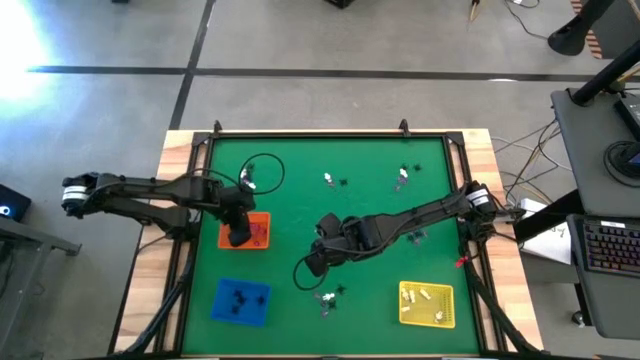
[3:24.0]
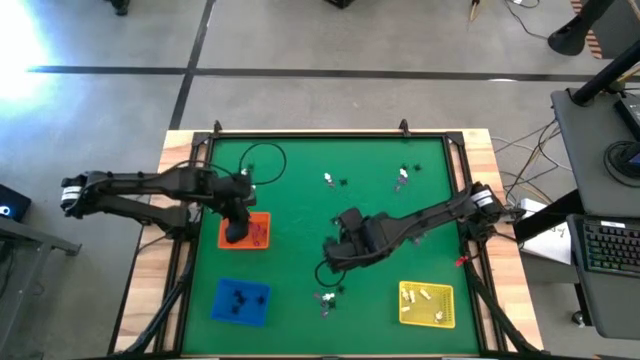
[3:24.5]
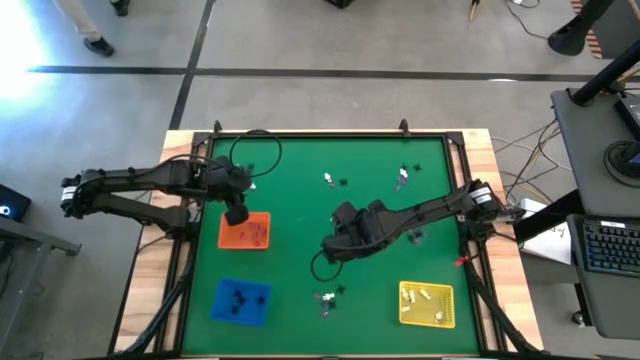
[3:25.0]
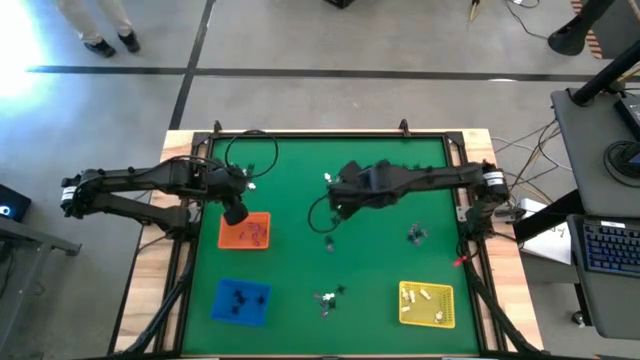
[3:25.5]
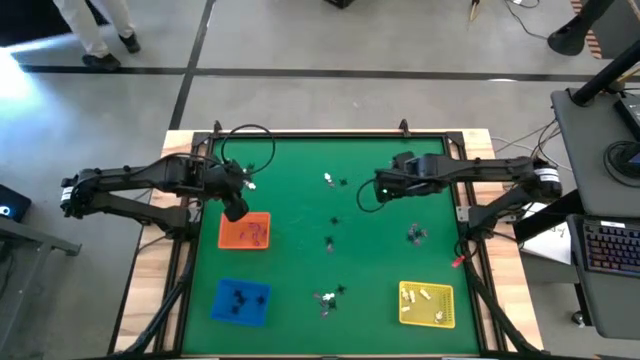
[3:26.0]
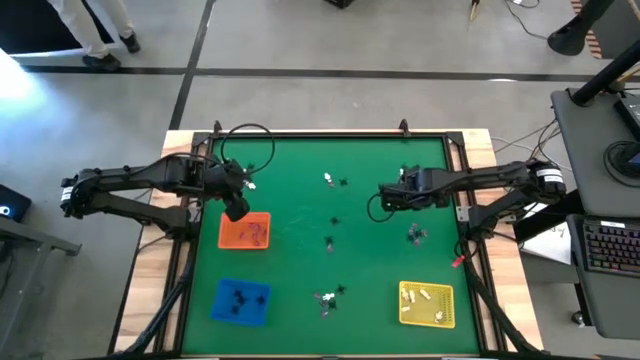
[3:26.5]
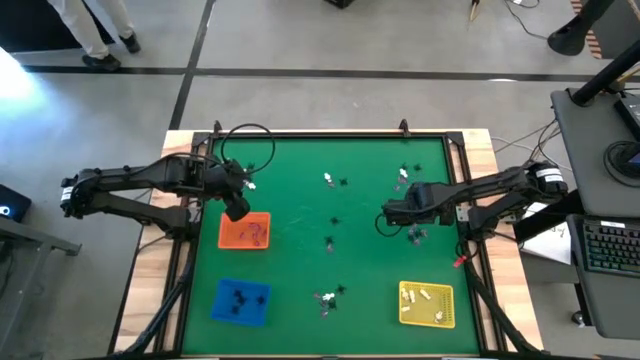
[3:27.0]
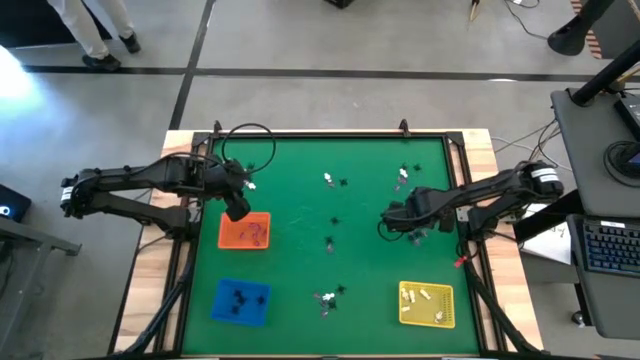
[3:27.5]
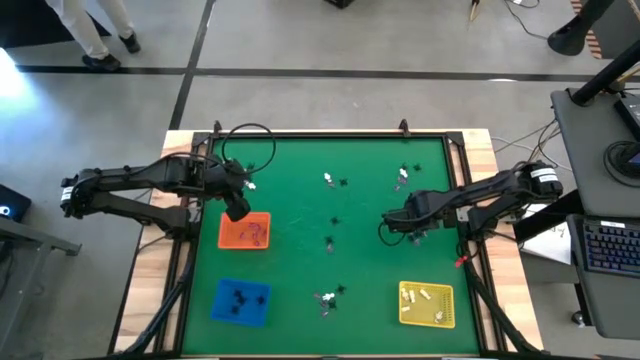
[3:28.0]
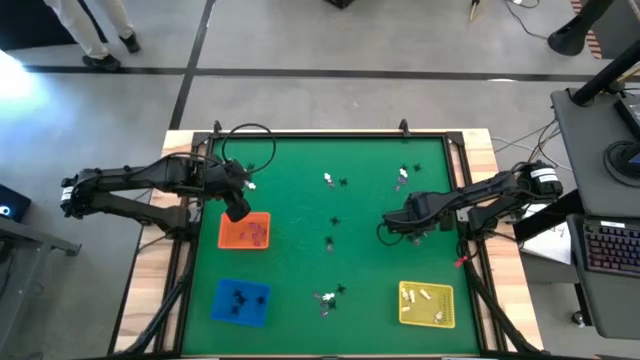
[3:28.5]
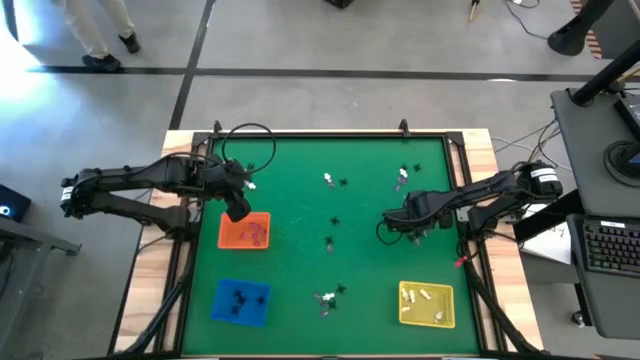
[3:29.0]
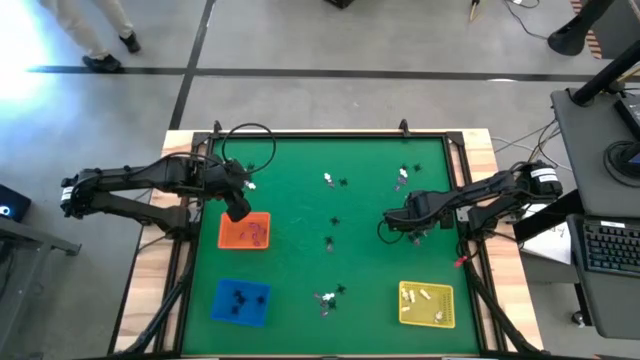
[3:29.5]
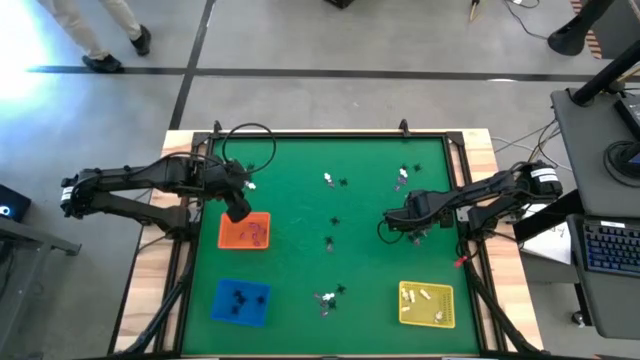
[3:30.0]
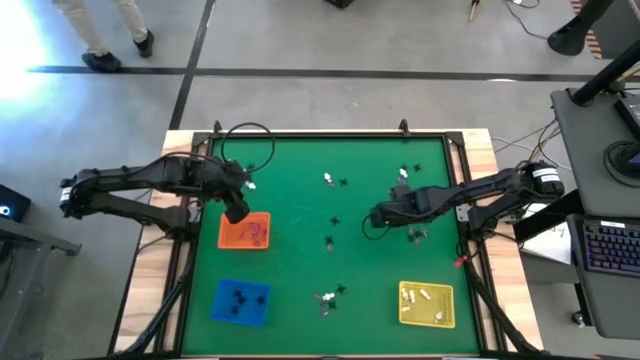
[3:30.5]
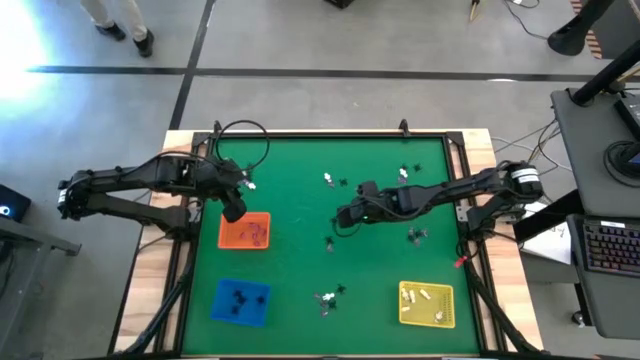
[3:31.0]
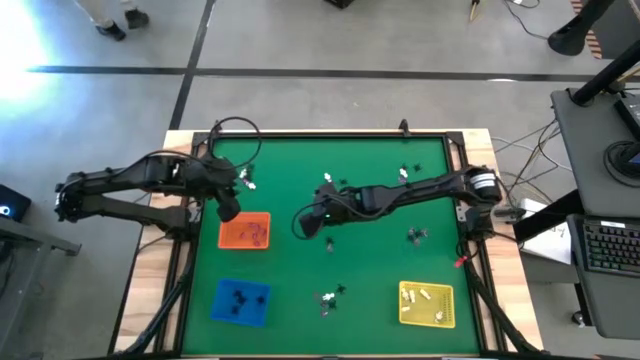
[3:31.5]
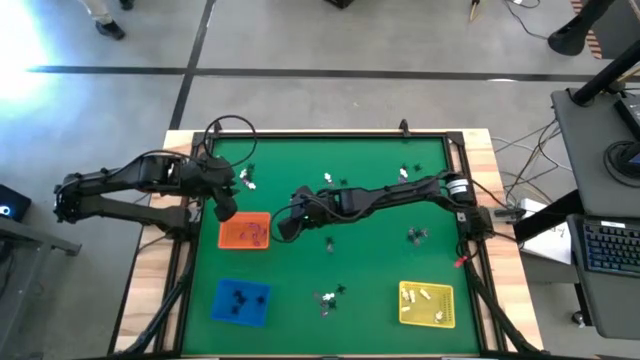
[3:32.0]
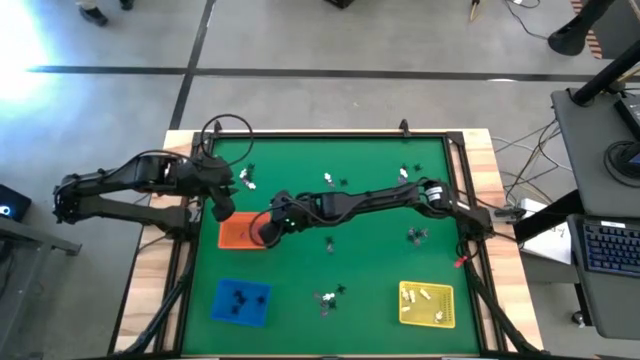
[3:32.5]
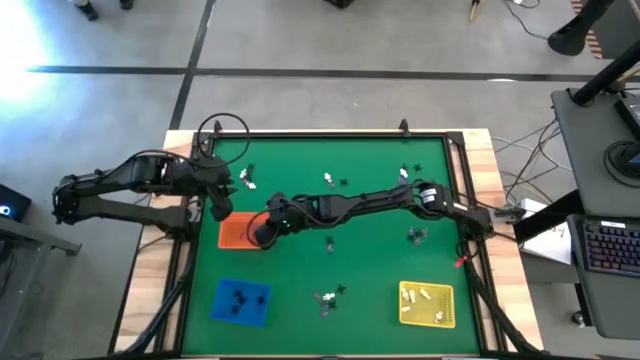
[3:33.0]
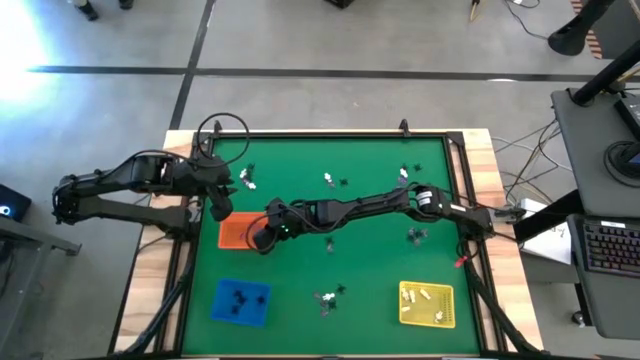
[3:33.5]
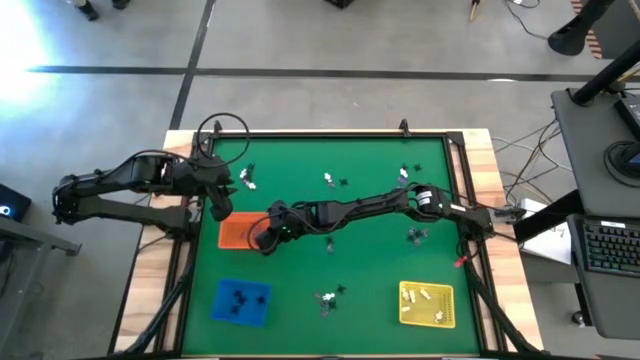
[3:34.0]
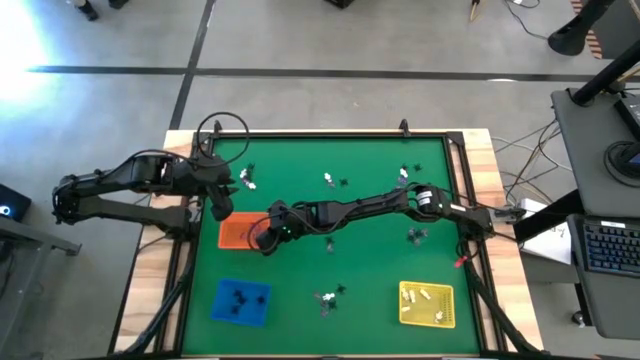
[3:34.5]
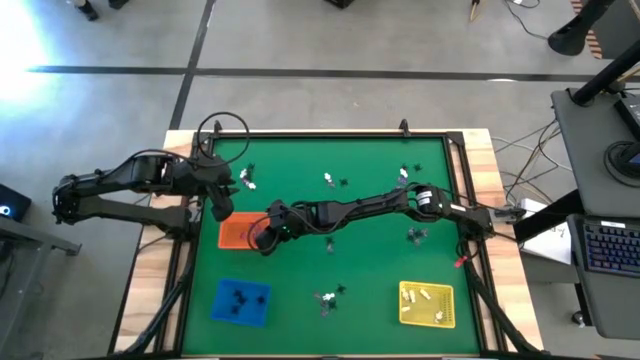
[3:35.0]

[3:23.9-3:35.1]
Task: Sort Halloween decoration
Put the violet witch hat toy into the orange bin

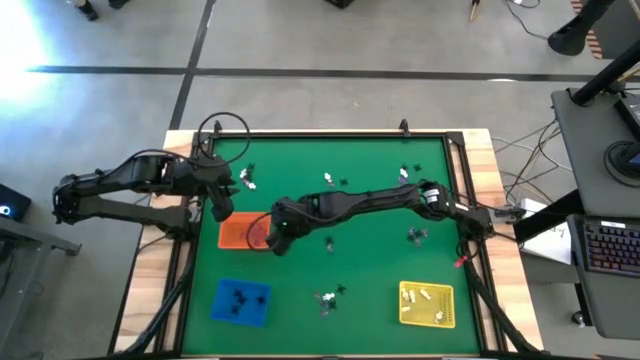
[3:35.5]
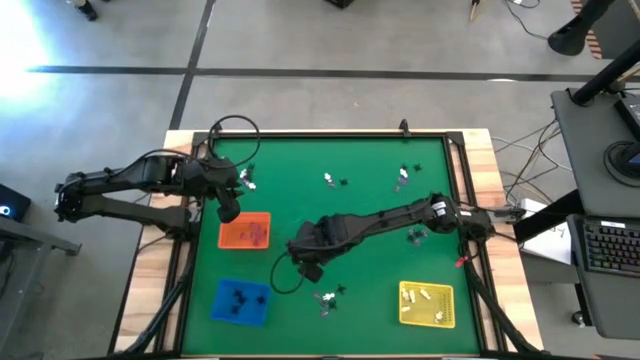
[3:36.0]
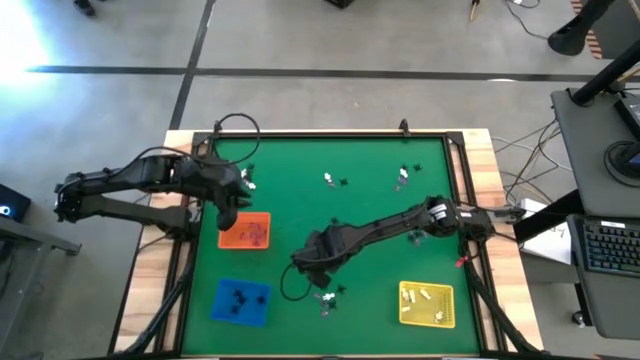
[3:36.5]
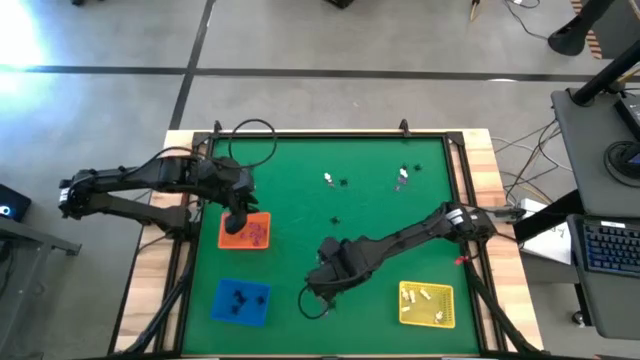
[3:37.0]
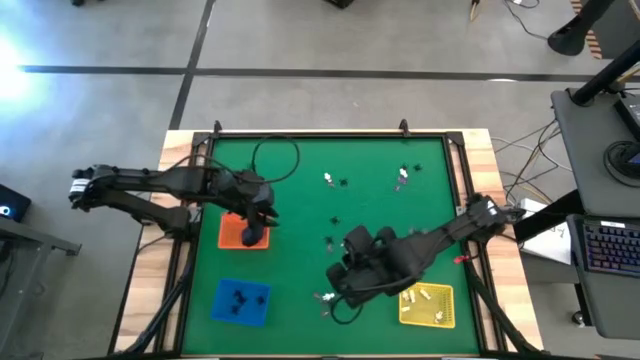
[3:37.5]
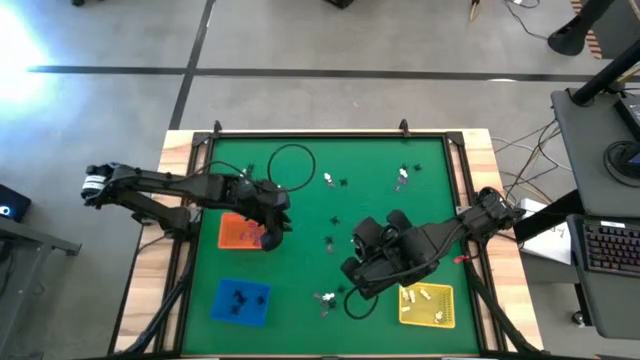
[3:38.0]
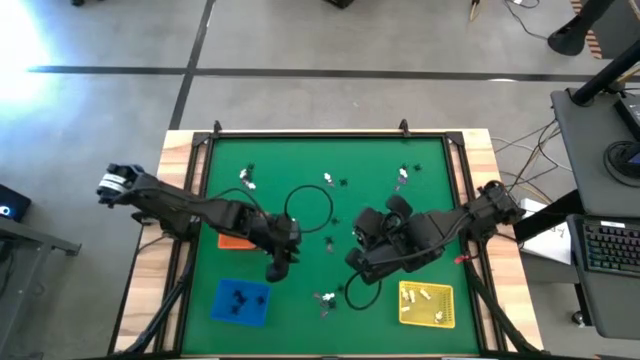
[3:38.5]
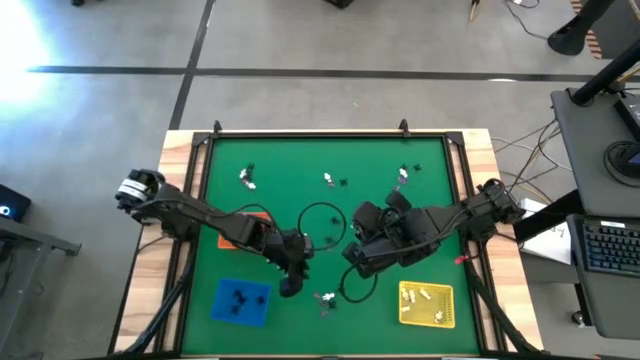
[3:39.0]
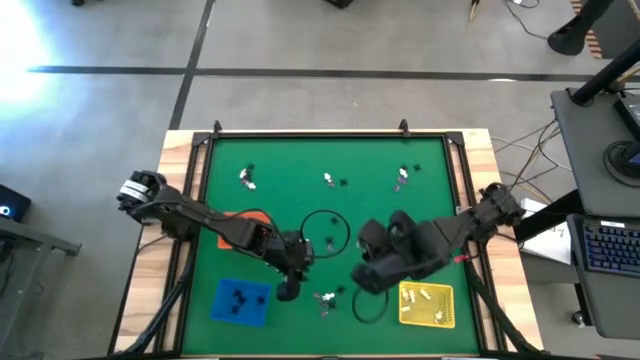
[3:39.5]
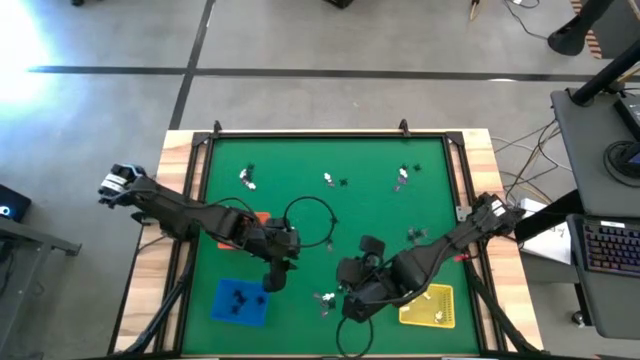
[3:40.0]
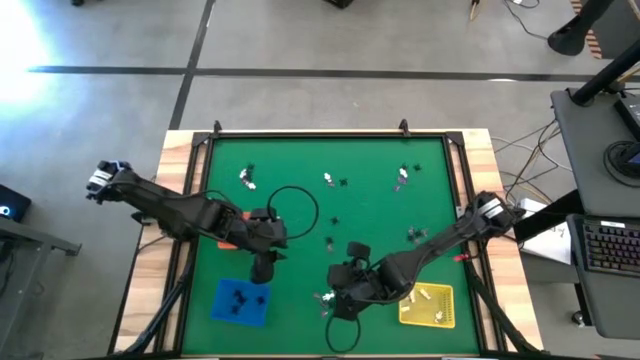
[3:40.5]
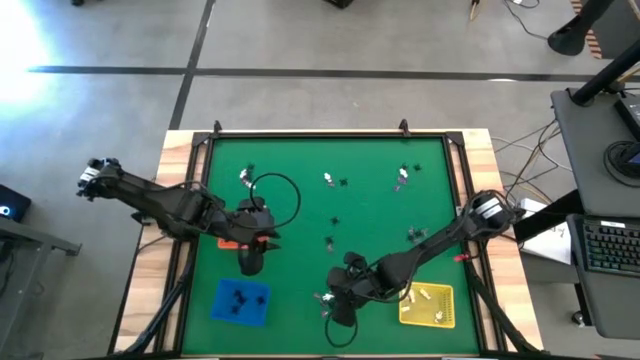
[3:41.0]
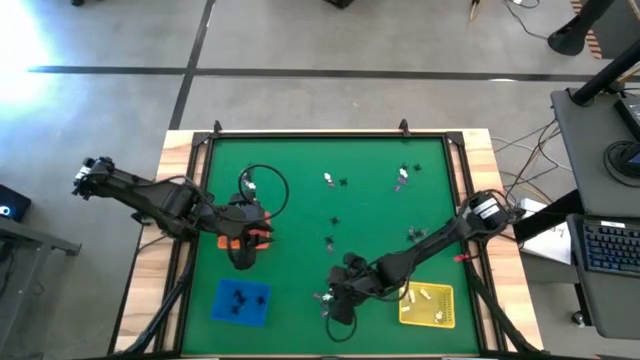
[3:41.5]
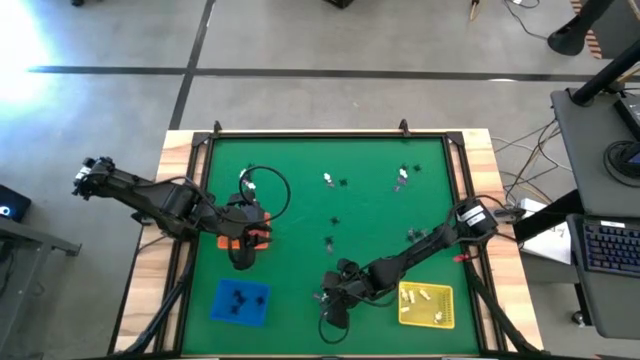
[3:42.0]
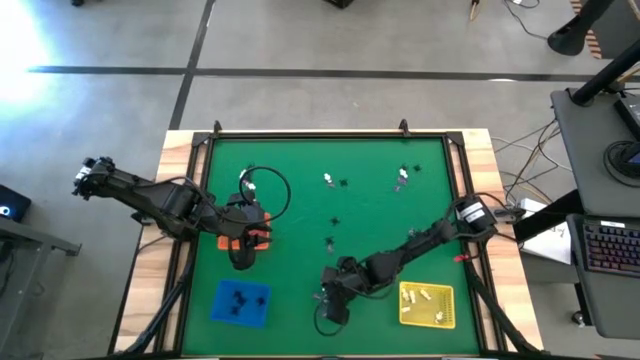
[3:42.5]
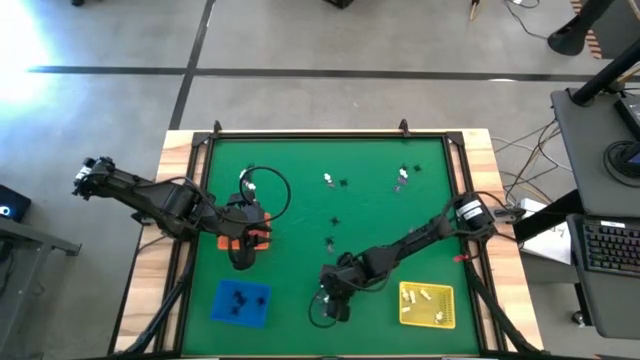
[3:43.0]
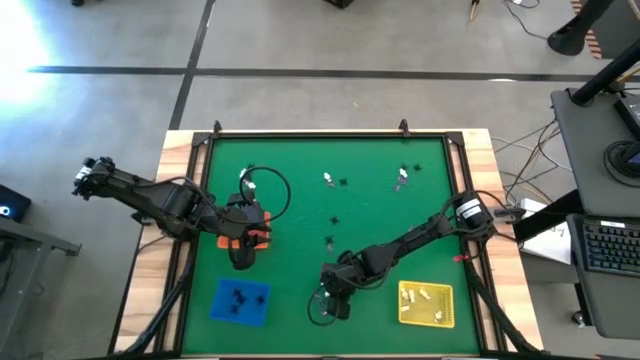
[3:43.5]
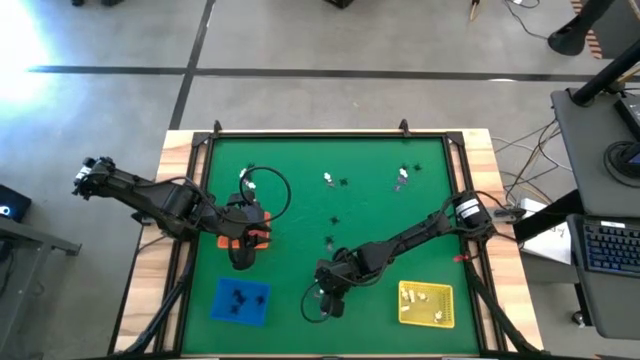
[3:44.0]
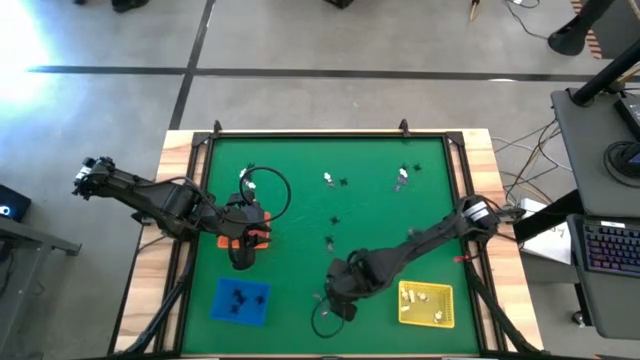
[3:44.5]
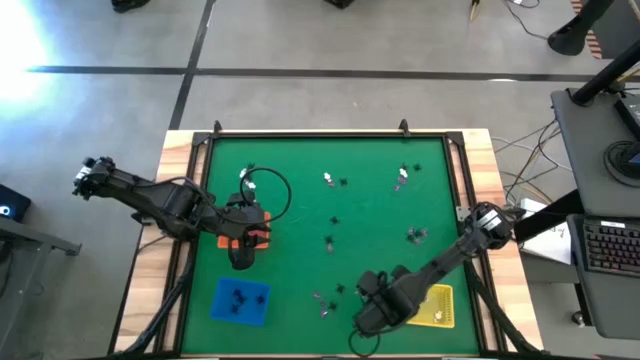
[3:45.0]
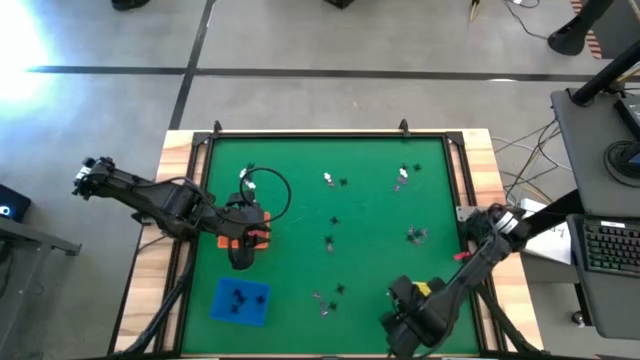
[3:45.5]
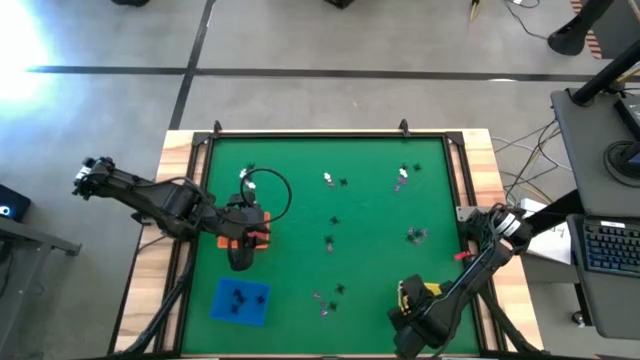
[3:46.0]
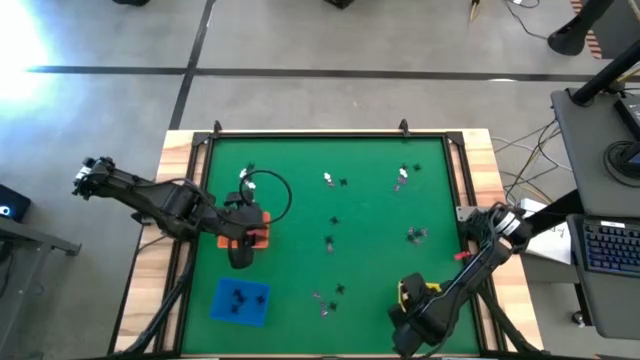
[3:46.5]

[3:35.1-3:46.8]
Put the white skeleton toy into the yellow bin
